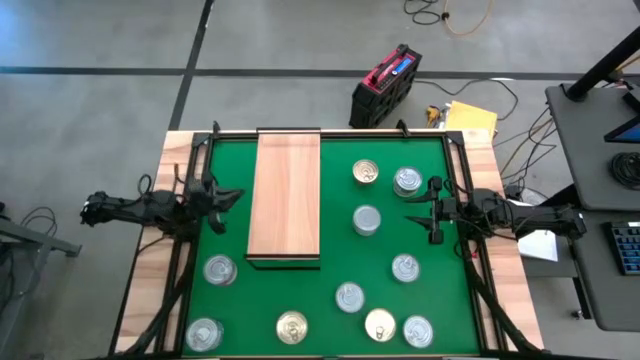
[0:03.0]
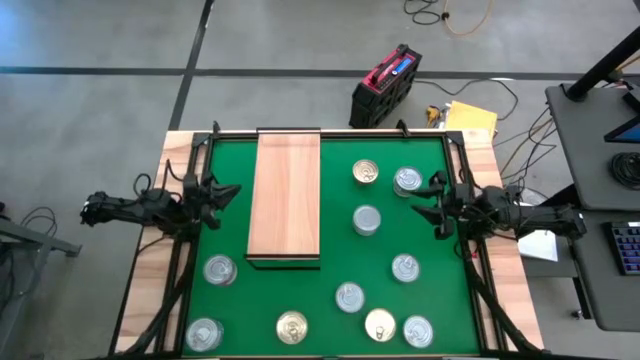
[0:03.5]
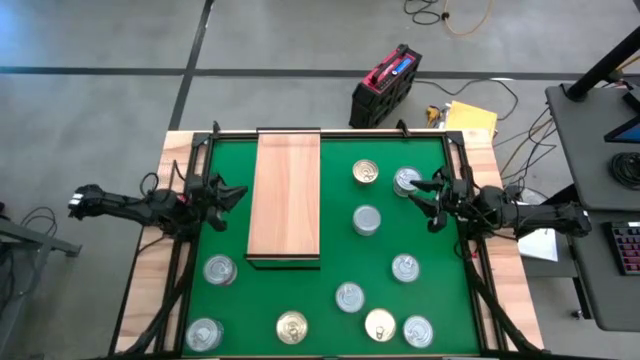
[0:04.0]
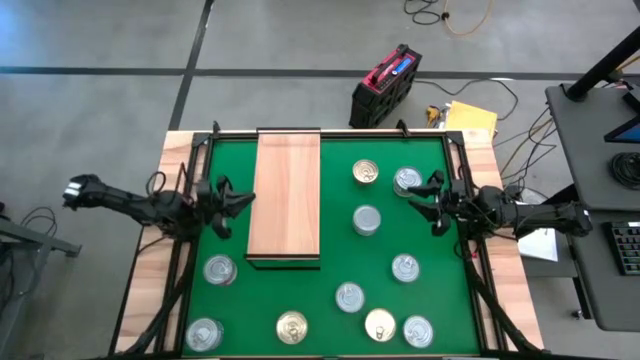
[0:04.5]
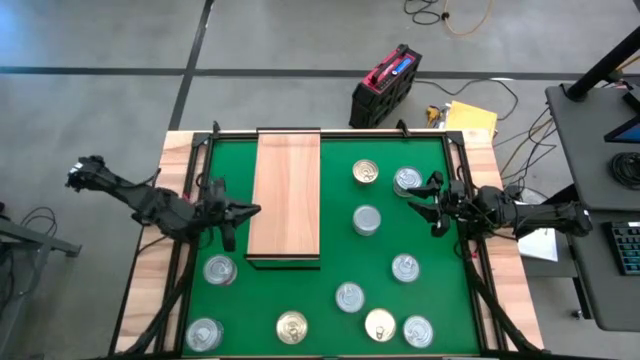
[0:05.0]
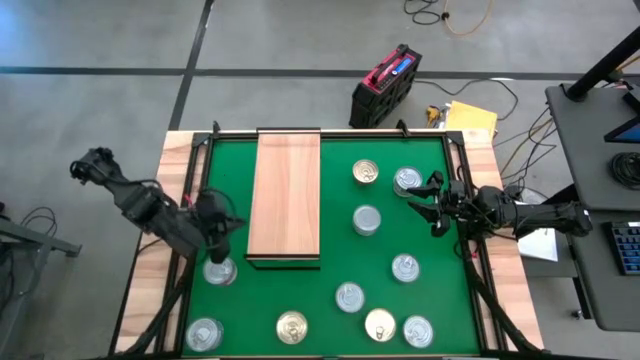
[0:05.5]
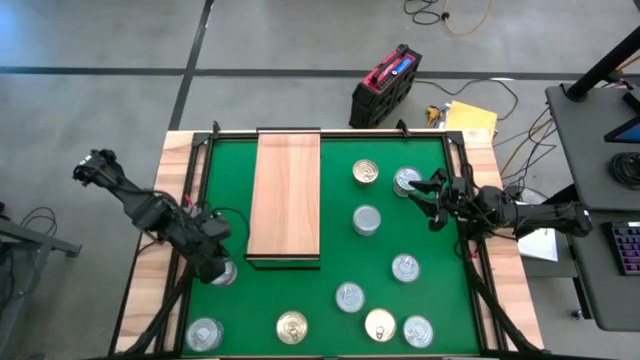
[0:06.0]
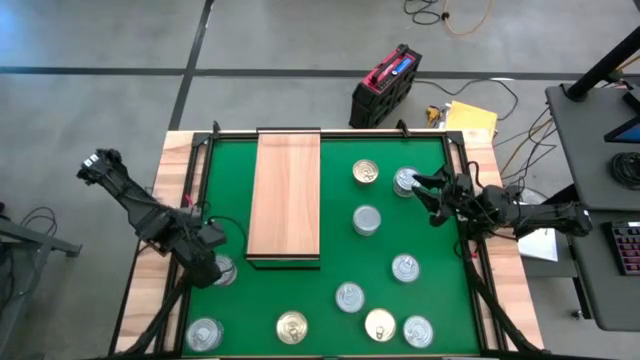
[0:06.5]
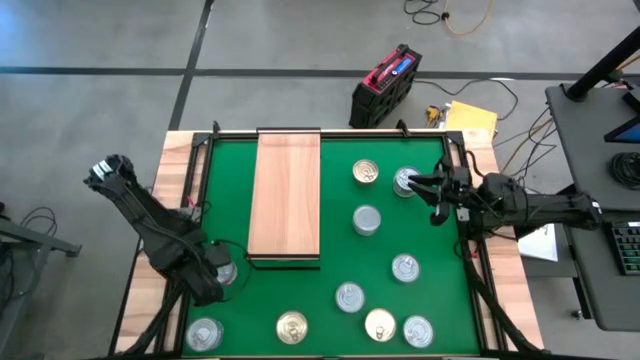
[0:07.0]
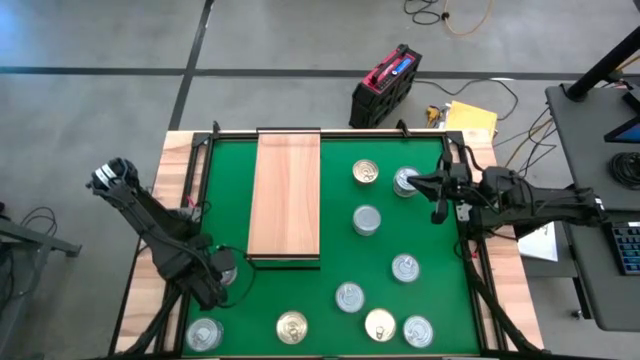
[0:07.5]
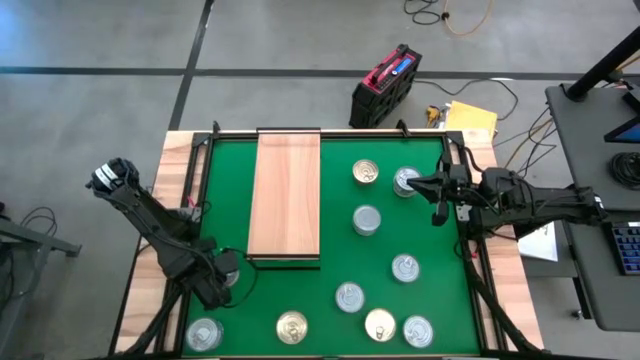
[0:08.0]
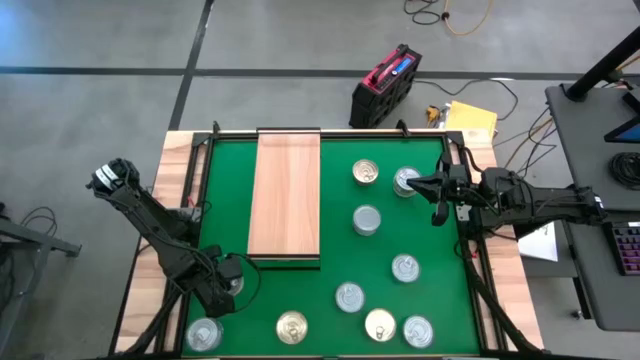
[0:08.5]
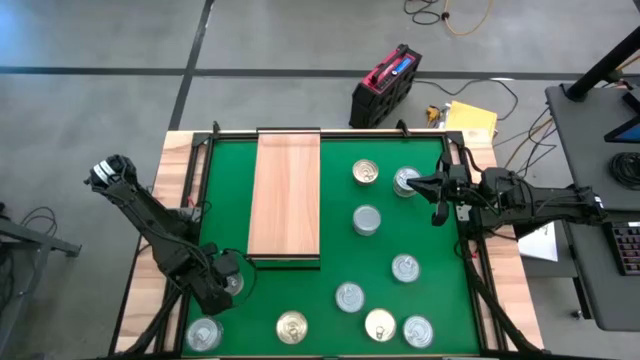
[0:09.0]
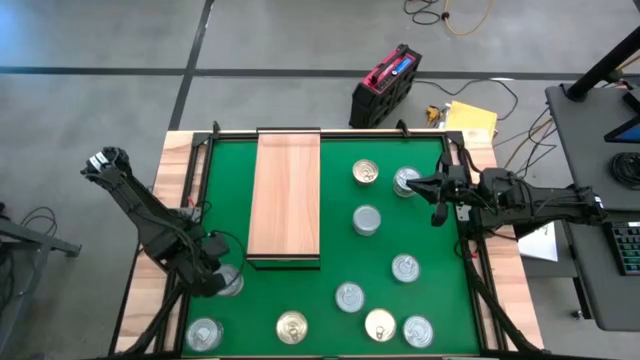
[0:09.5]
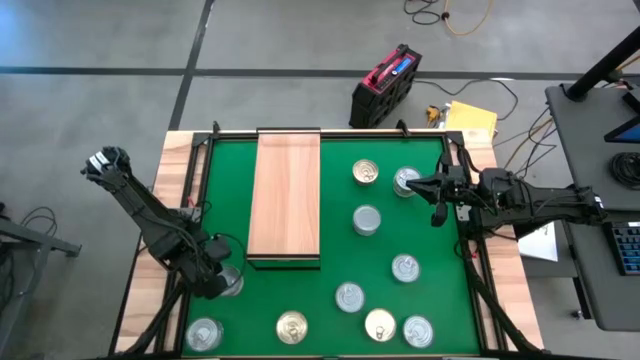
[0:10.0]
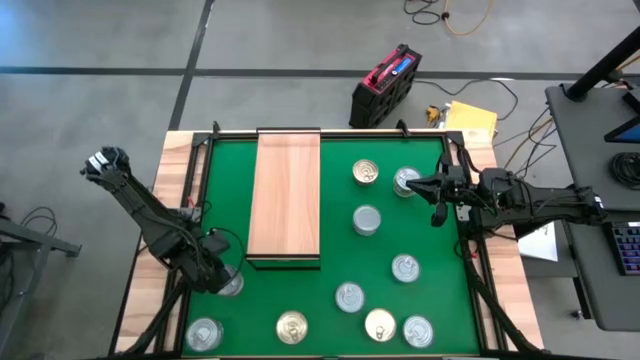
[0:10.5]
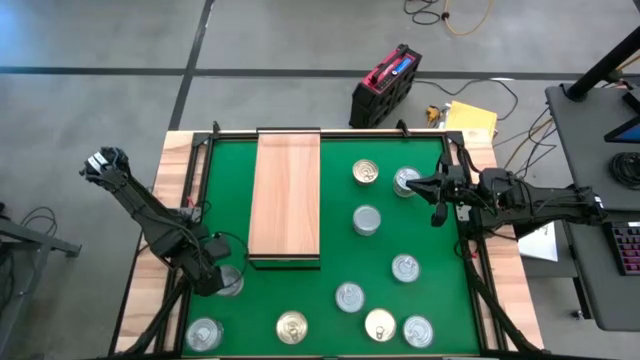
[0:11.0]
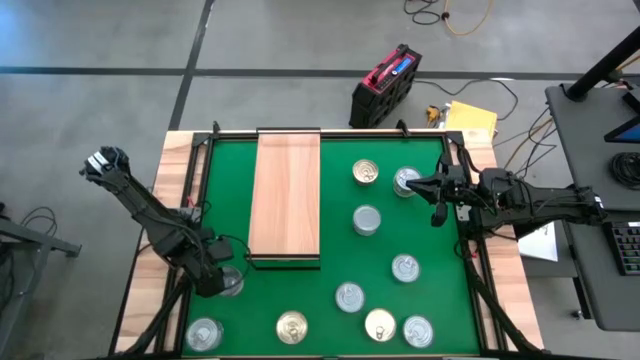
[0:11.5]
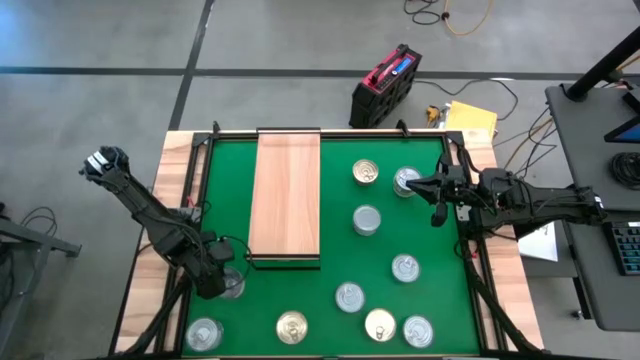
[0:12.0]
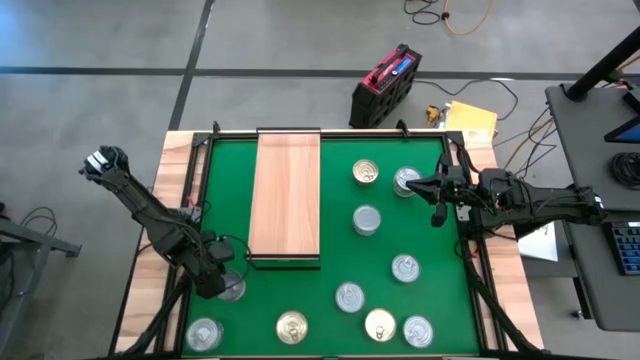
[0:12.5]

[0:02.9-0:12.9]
Task: Stack canned seafood by type on shelf
Put the red tuna can on the shelf

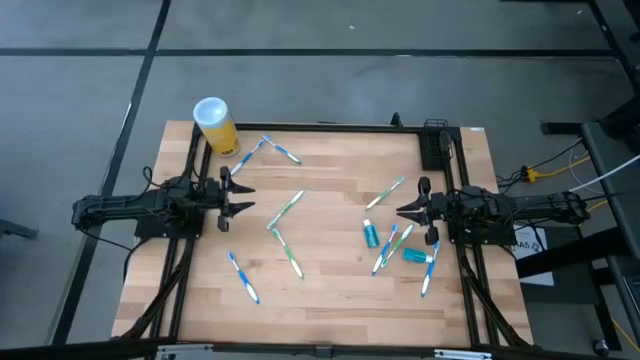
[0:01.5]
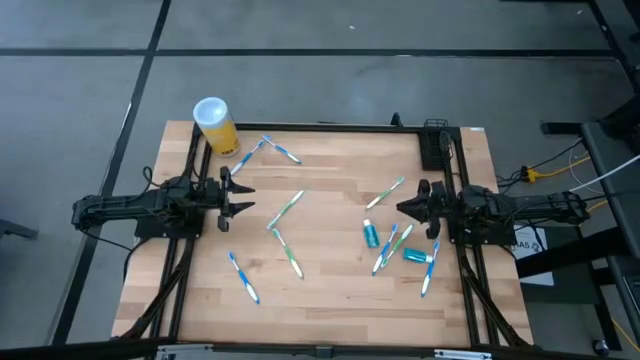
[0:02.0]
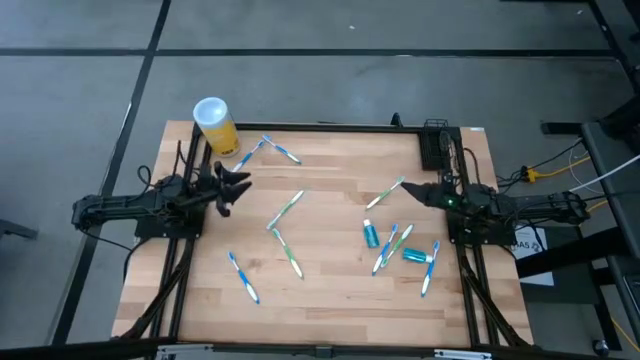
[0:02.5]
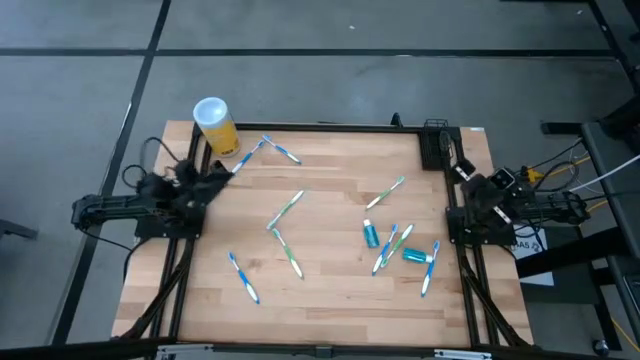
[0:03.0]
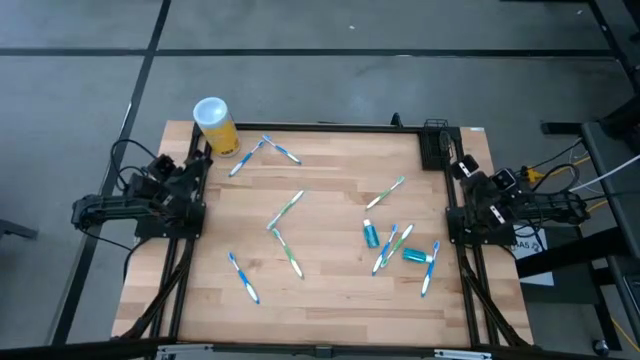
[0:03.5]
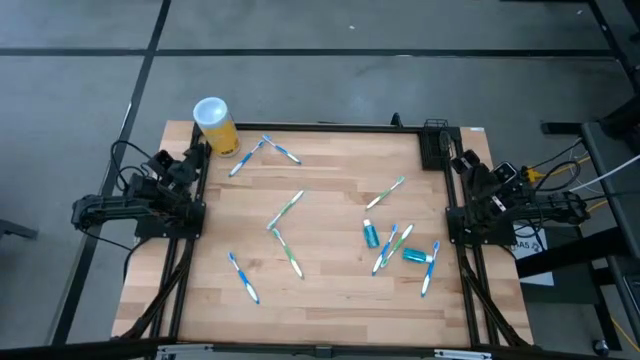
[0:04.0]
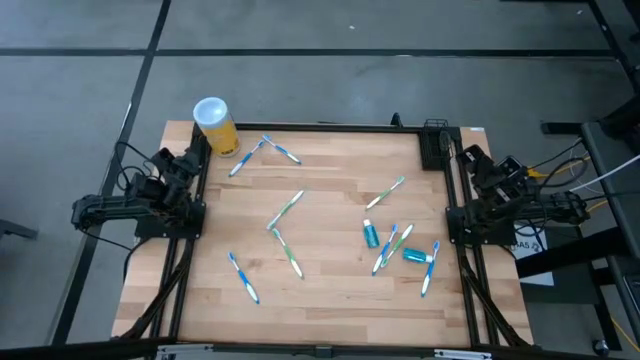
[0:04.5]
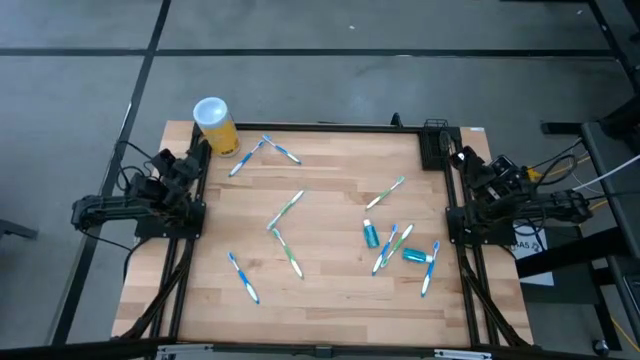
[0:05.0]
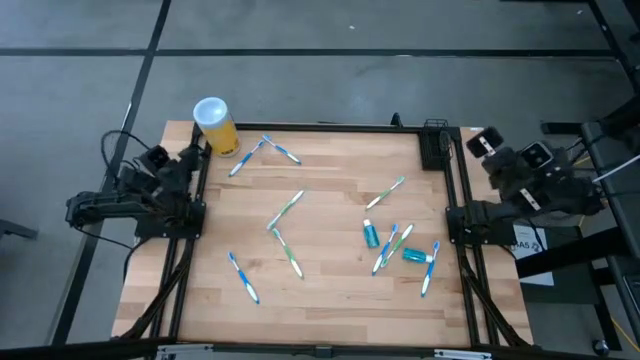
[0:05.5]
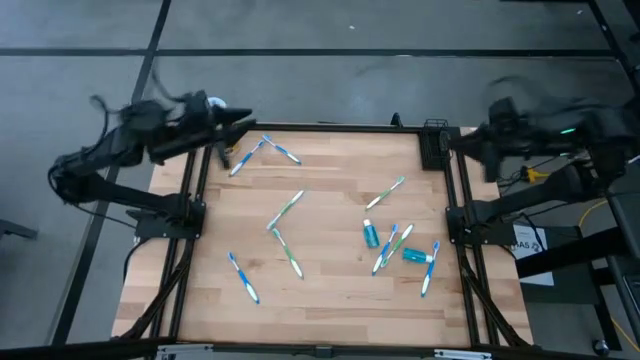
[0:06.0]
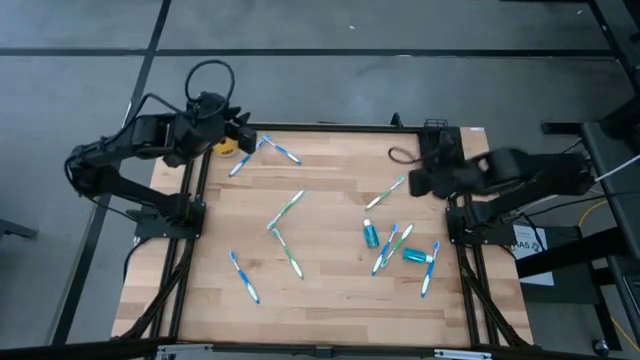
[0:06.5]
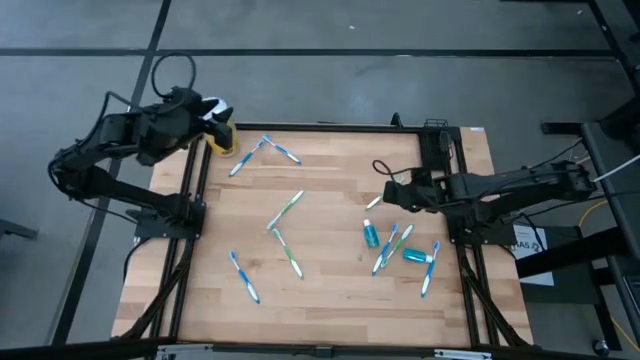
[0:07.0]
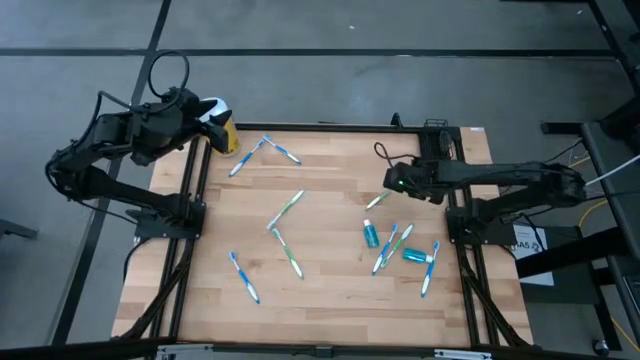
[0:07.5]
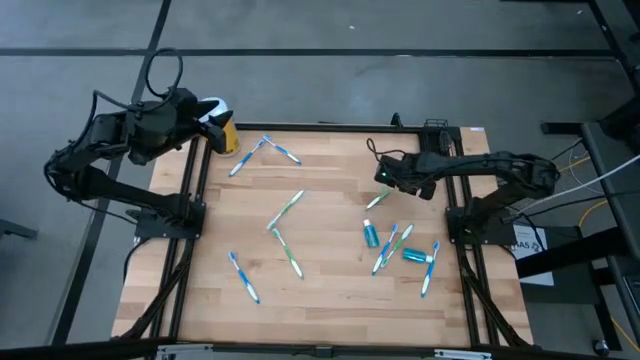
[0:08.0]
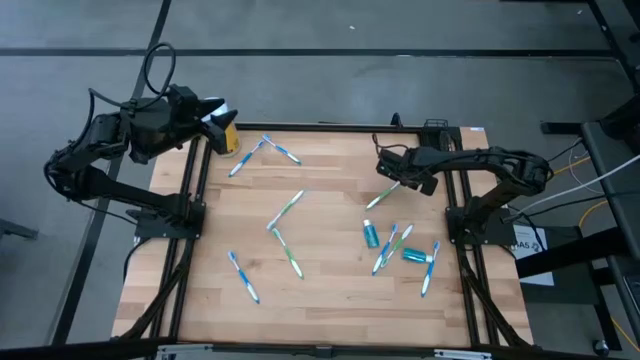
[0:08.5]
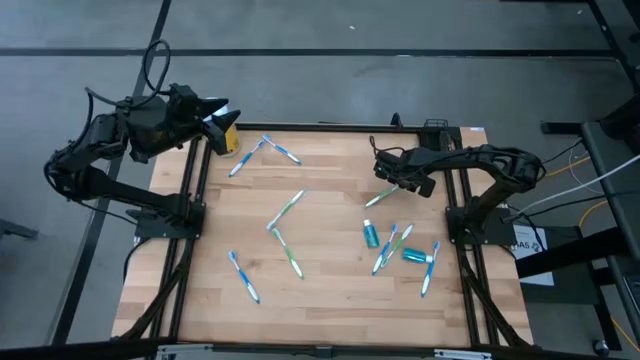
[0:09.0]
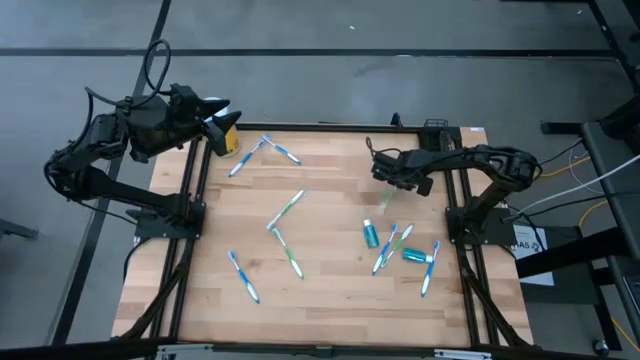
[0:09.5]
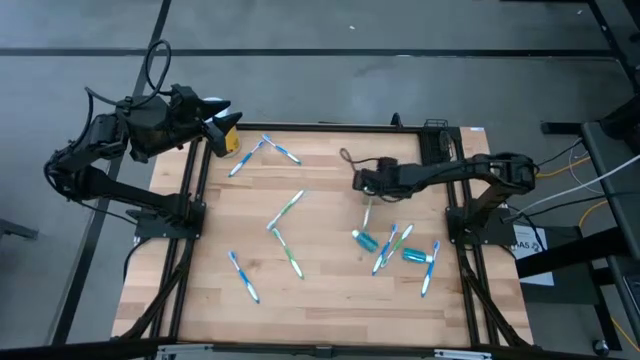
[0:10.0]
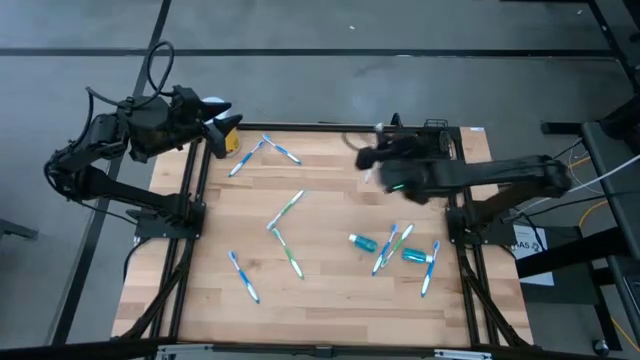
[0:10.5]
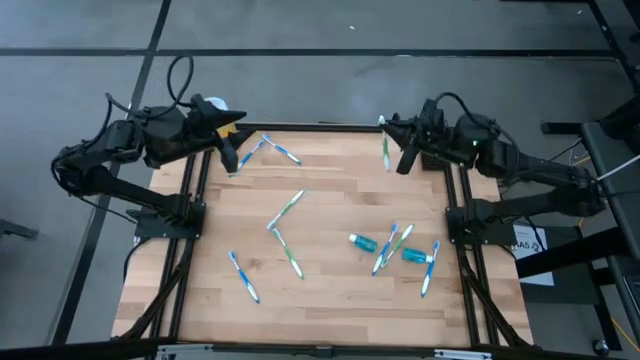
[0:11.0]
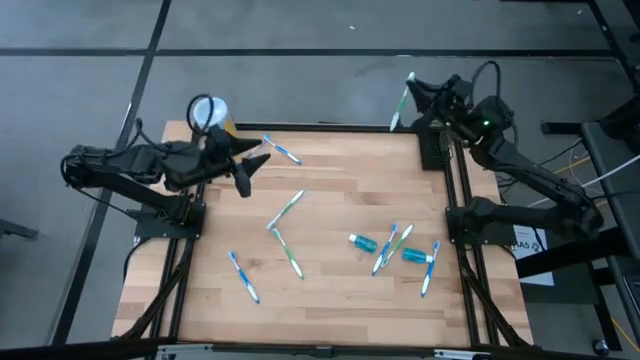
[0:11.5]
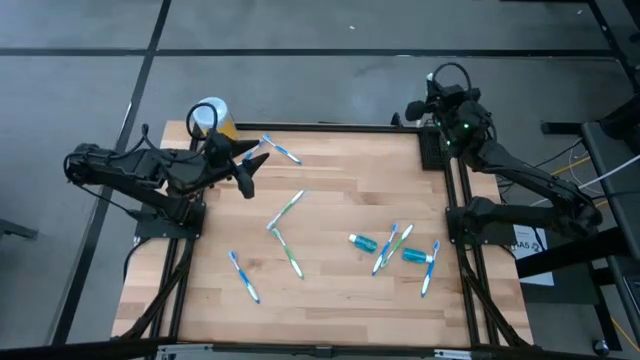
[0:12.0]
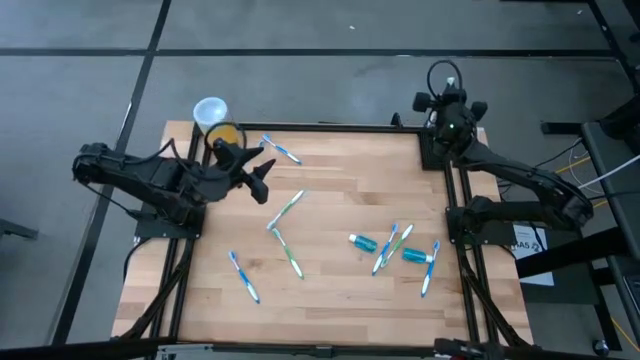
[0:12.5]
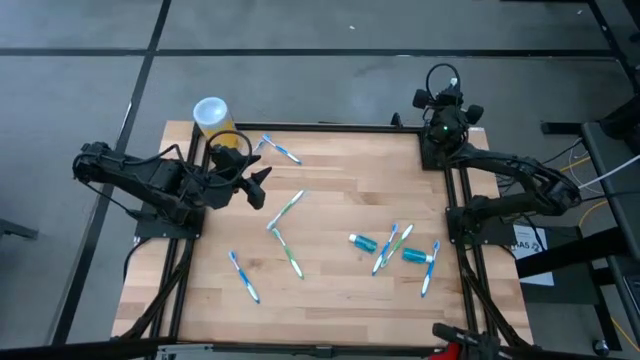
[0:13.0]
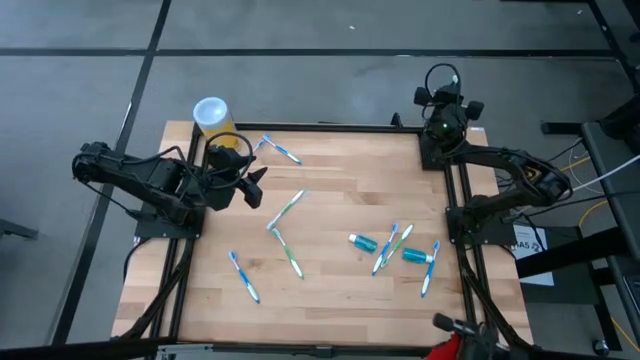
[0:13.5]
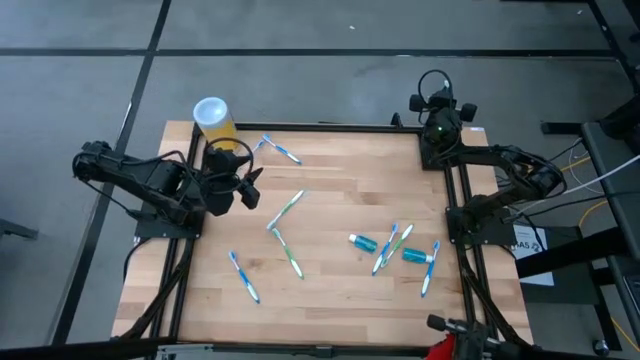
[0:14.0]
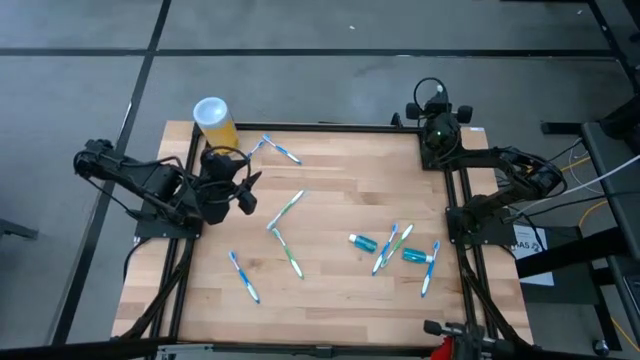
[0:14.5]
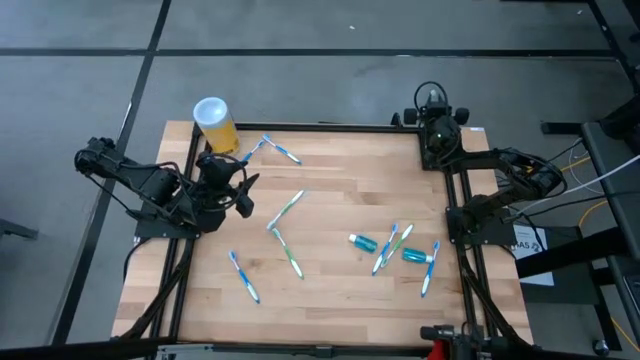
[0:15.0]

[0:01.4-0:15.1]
Task: Pick & Place toothbrushing station
Put the green toothbrush into the mesh organizer
